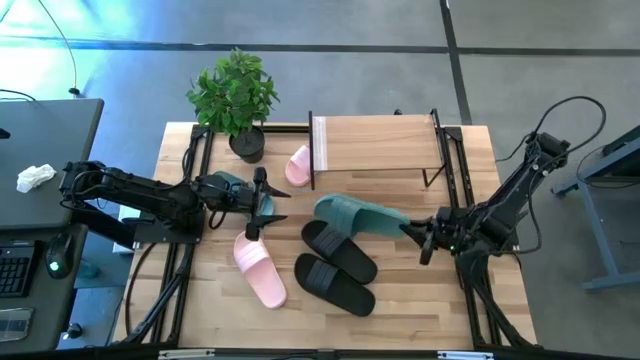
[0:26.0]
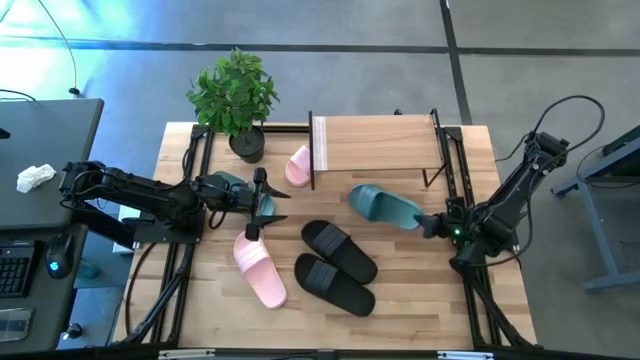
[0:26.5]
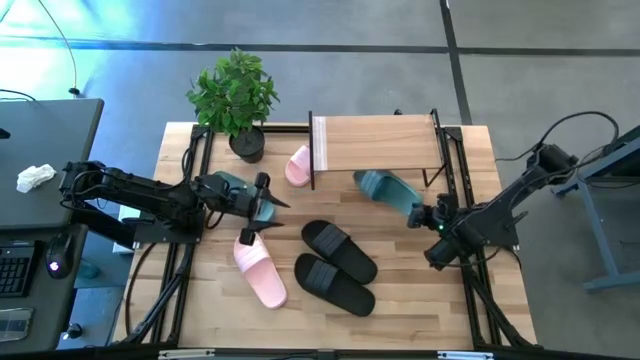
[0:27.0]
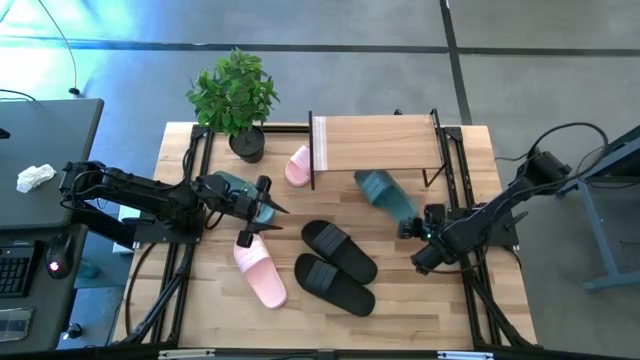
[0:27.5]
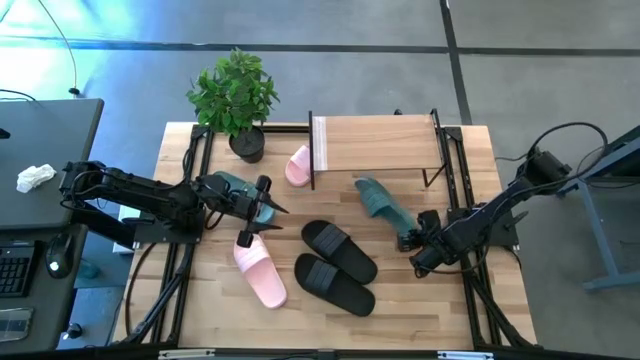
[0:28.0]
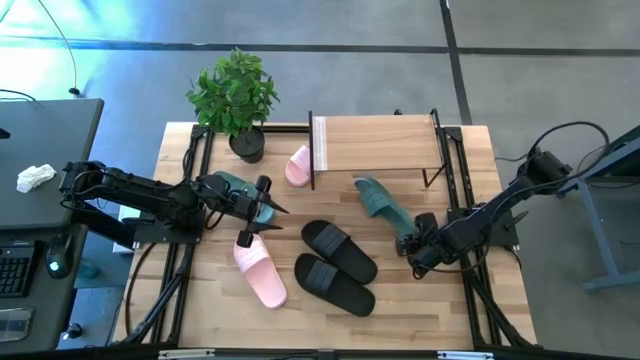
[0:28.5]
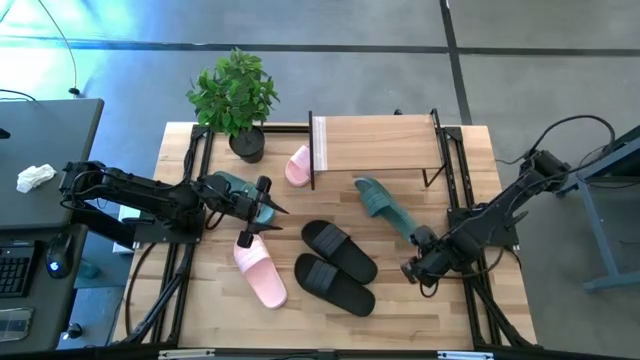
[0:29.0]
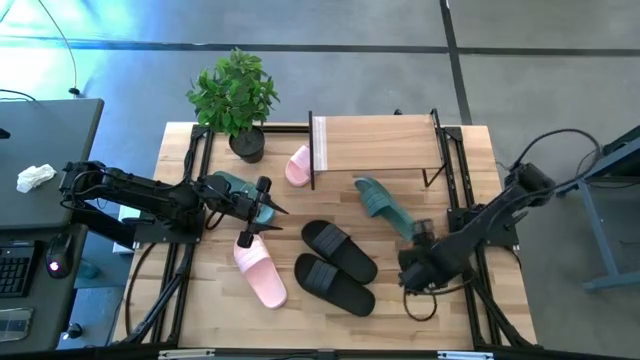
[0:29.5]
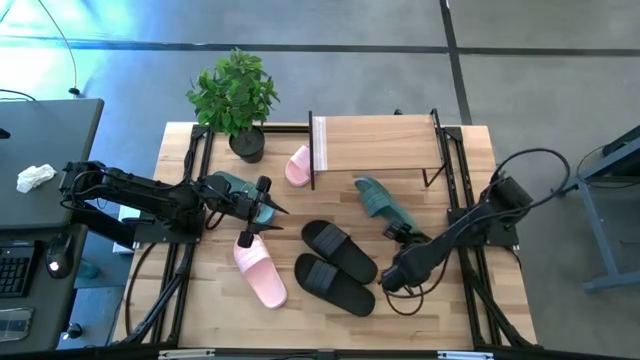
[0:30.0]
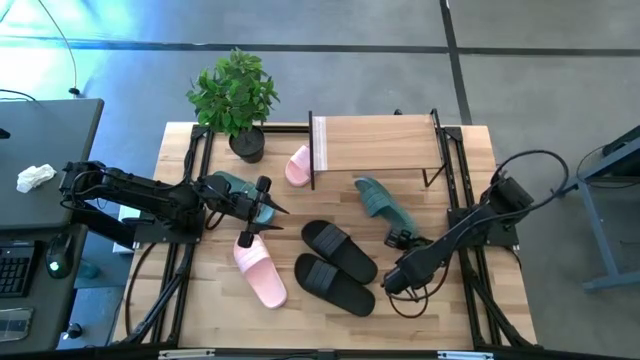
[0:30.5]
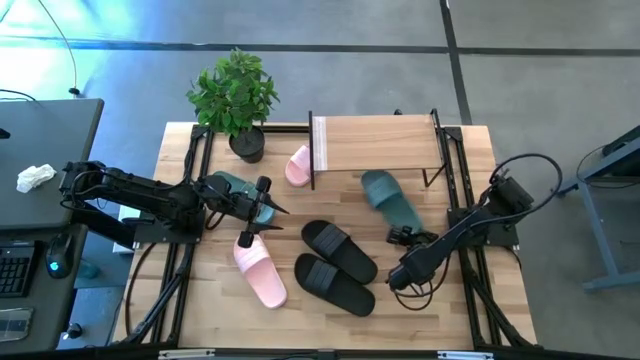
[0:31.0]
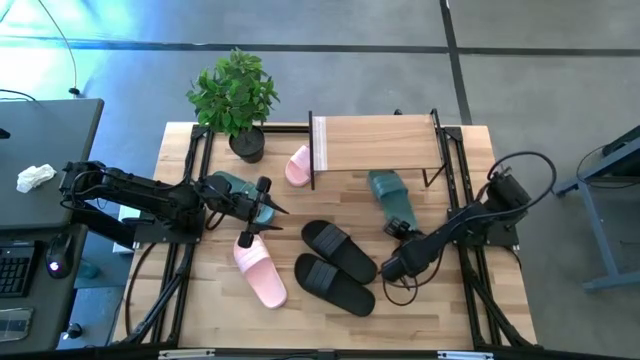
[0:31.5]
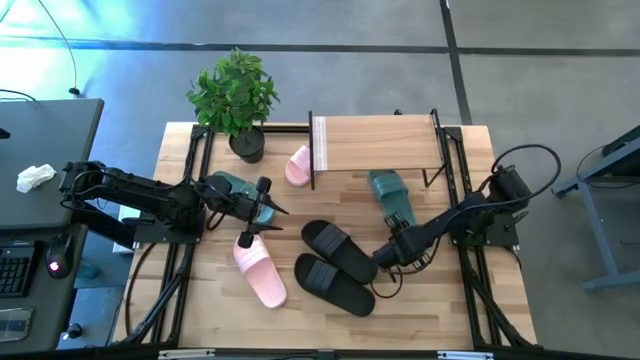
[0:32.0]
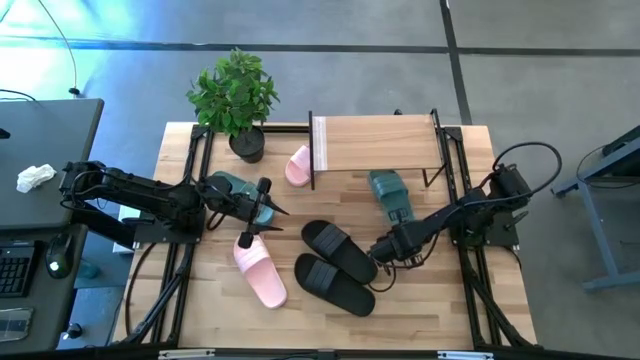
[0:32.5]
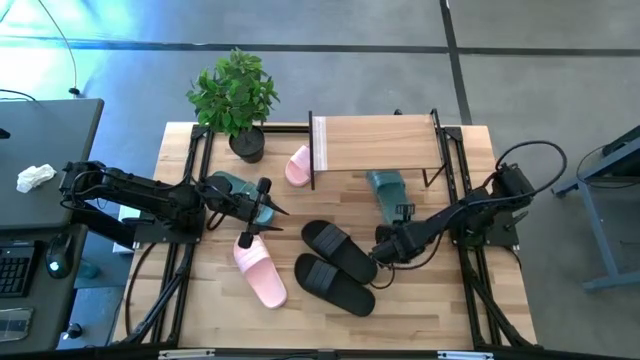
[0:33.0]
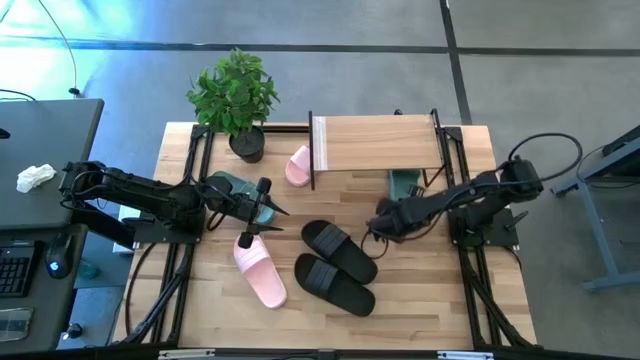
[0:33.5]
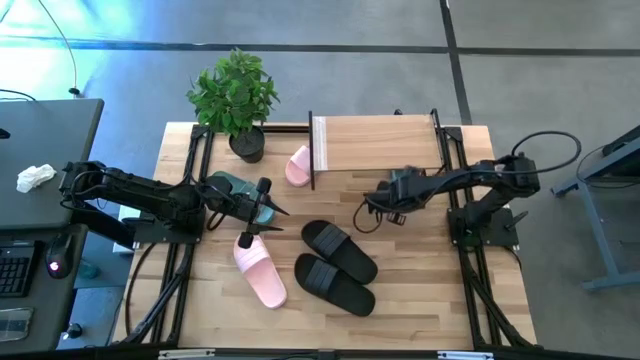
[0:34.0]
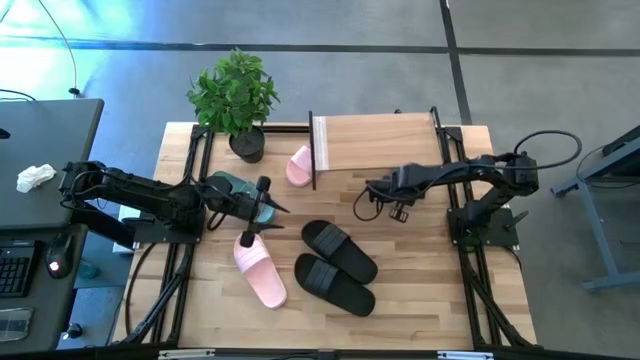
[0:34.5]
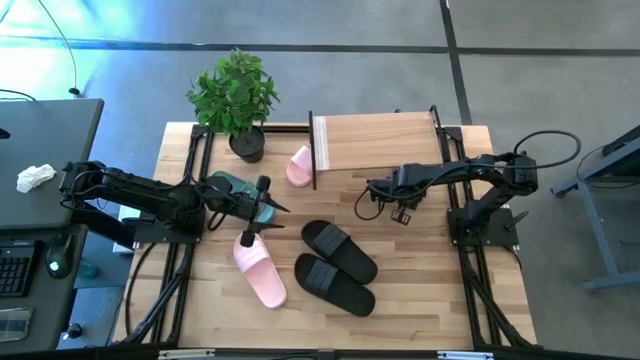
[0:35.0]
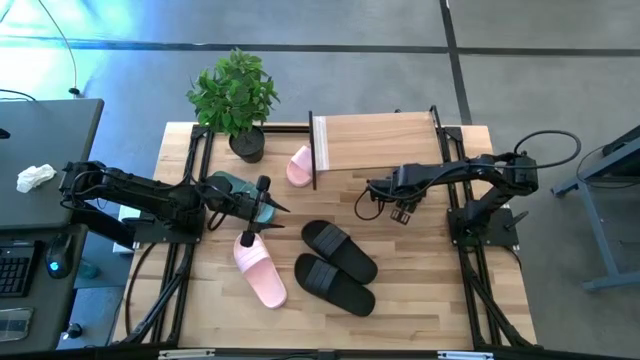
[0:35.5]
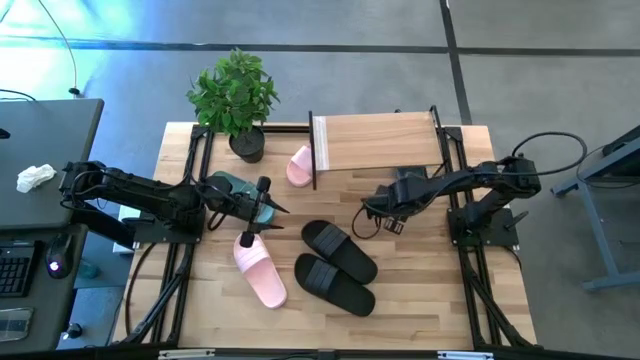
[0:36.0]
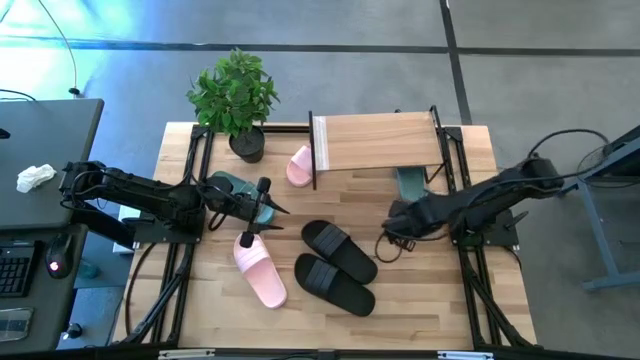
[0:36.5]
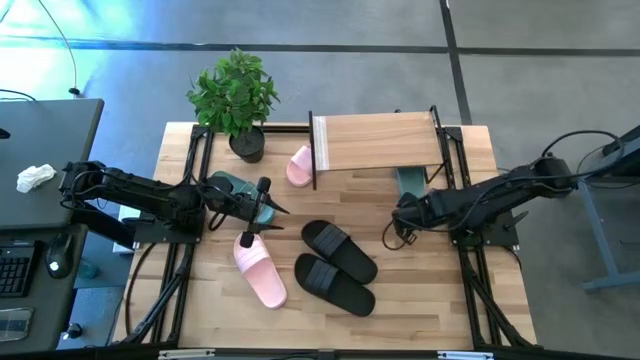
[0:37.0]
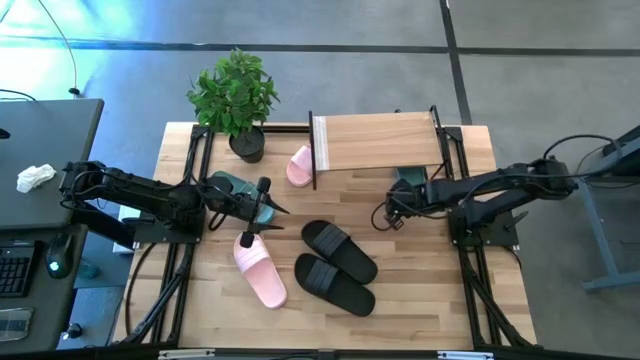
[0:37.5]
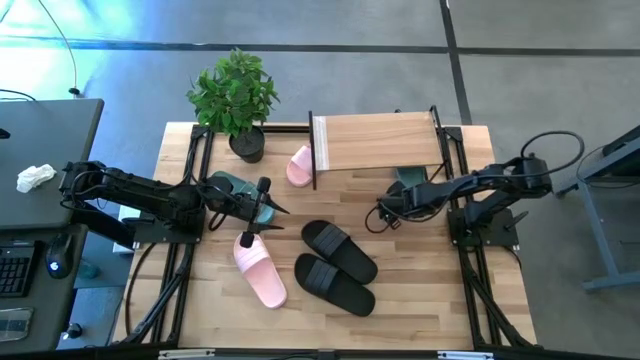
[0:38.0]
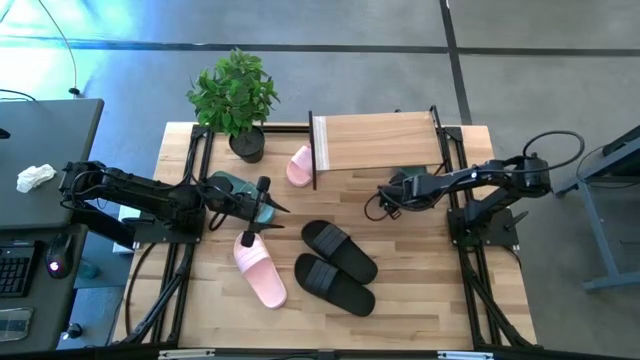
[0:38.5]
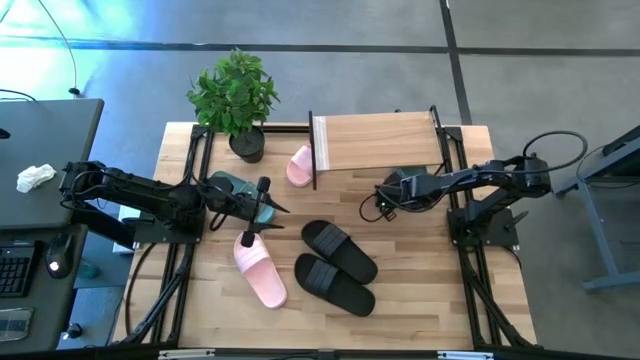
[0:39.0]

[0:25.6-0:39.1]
Task: Pick and place slides into the shelf
Put the right green slide under the shelf
